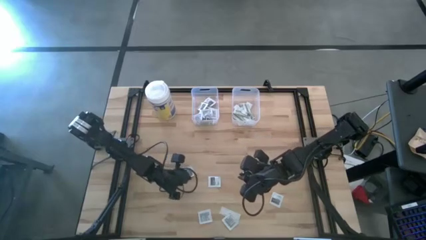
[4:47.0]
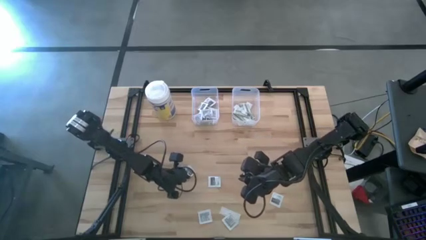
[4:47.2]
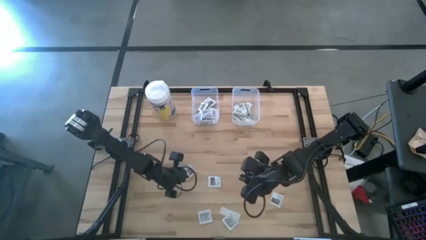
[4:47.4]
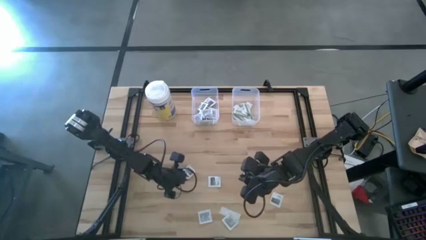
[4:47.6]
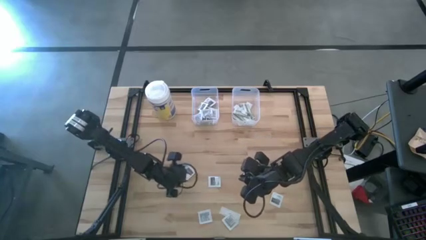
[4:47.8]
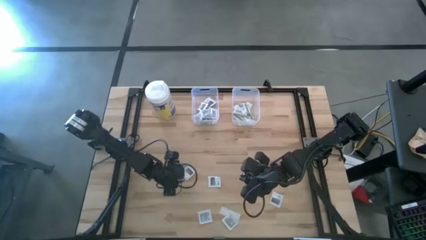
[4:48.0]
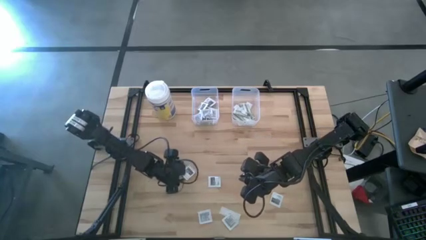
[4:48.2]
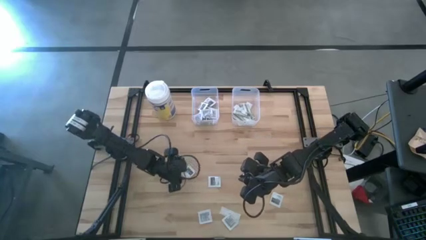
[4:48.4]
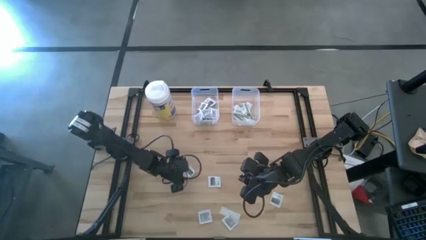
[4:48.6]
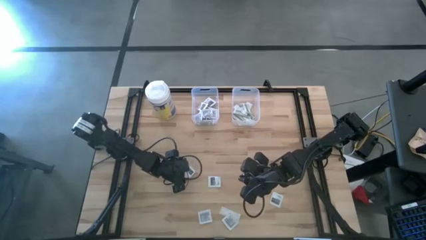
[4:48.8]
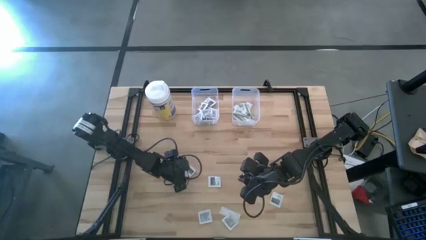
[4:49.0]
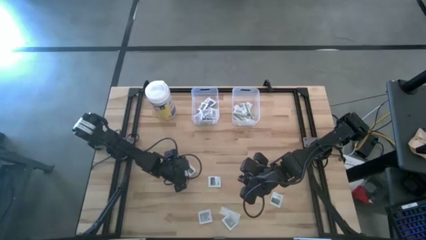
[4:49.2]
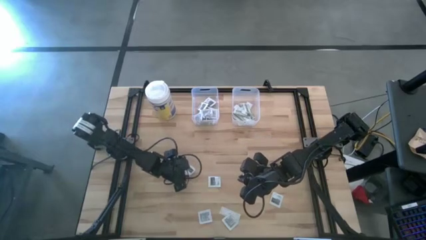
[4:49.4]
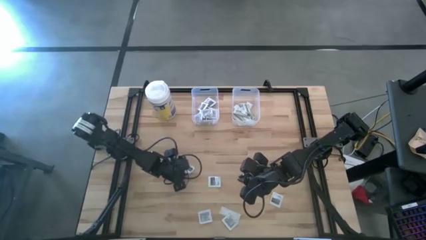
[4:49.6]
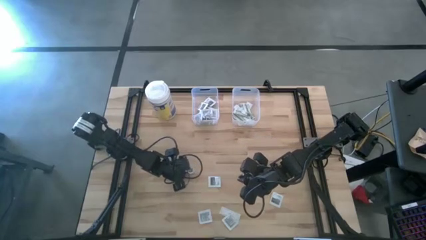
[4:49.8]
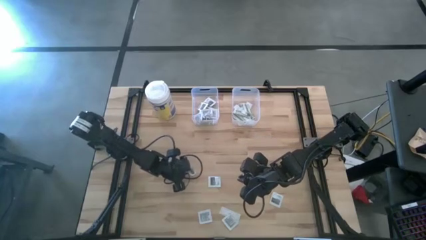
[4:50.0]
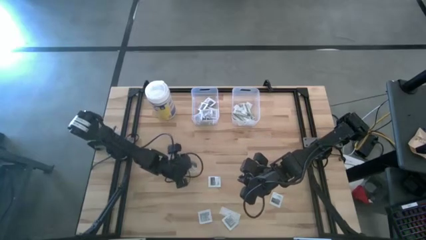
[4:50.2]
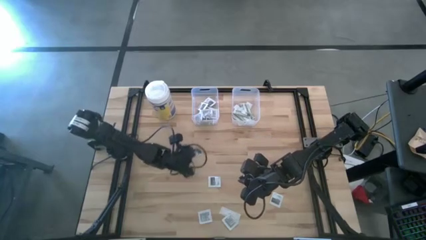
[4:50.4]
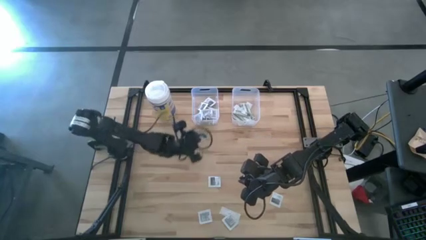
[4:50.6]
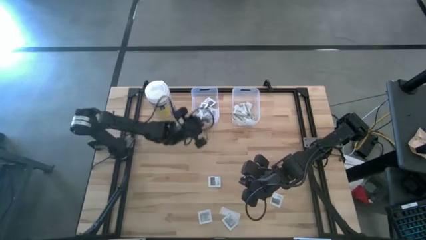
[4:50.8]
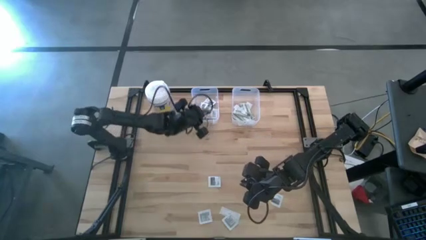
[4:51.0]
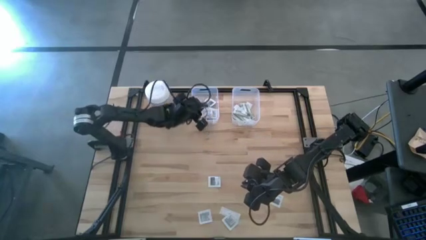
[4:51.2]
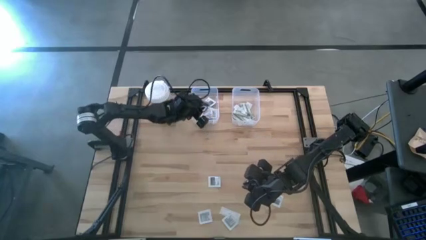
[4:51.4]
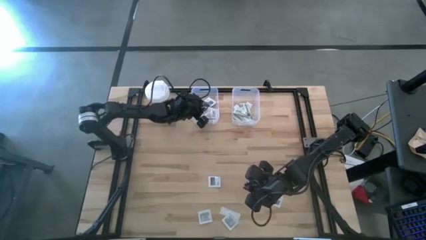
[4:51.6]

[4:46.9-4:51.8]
Task: Pick & Place First Aid Supplies
Put the towelette pack into the left transparent bin

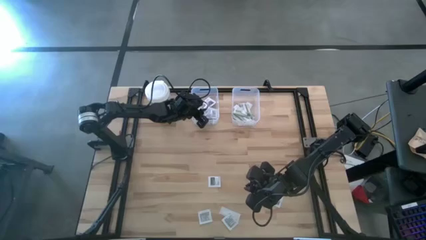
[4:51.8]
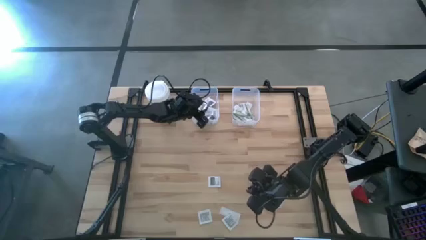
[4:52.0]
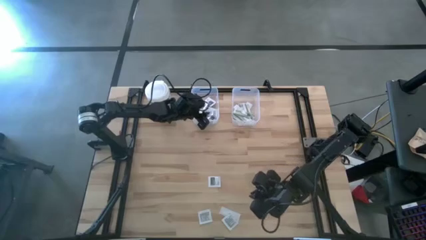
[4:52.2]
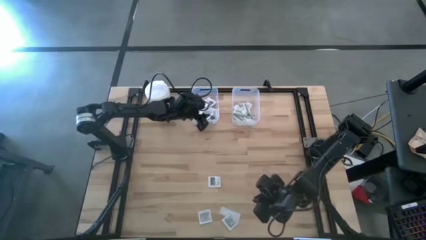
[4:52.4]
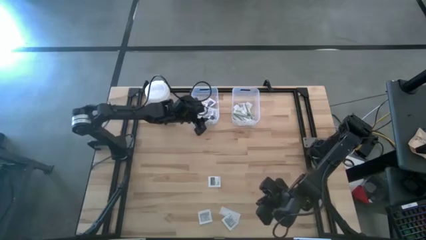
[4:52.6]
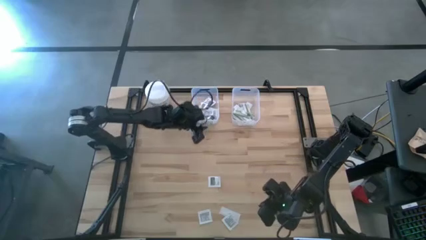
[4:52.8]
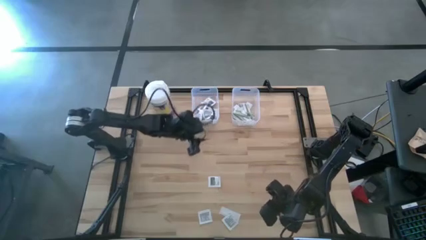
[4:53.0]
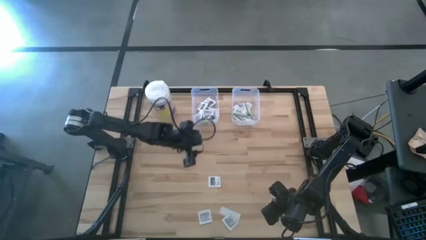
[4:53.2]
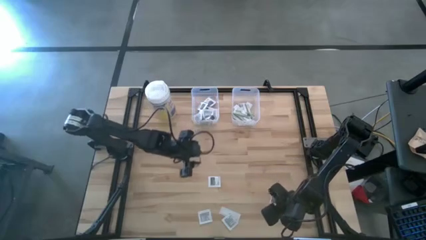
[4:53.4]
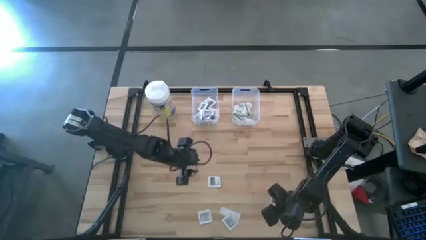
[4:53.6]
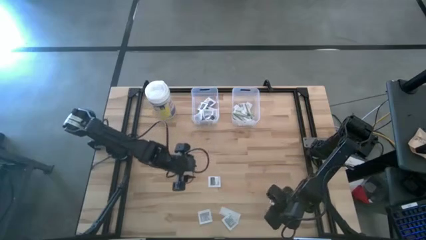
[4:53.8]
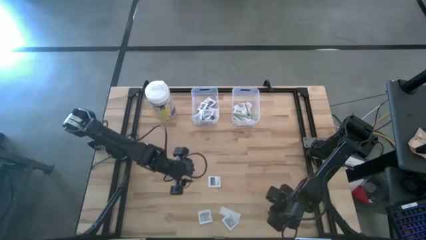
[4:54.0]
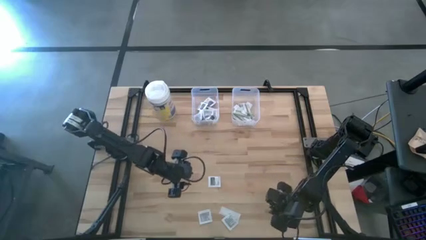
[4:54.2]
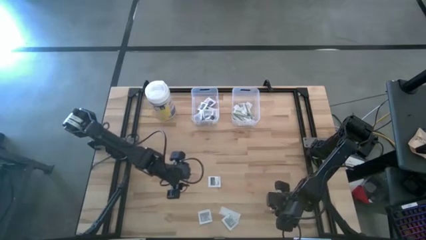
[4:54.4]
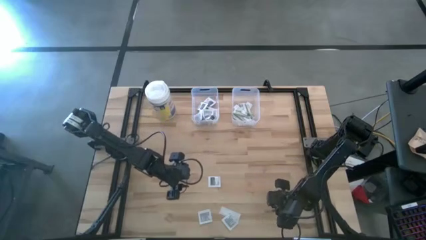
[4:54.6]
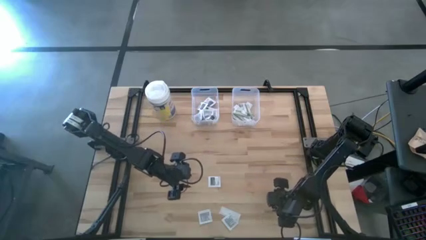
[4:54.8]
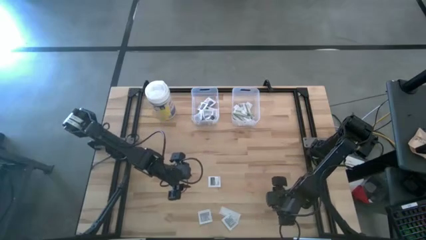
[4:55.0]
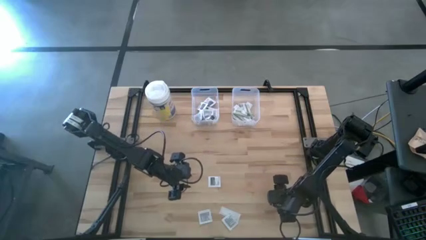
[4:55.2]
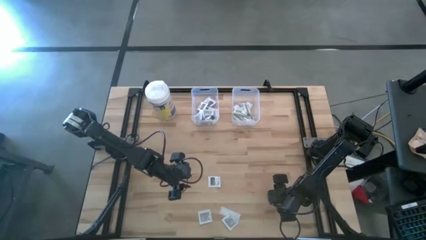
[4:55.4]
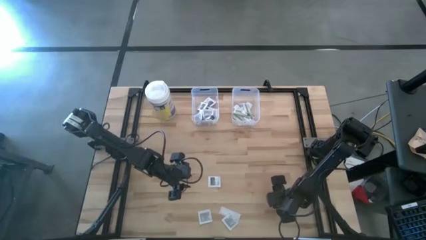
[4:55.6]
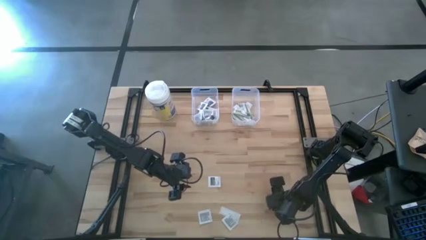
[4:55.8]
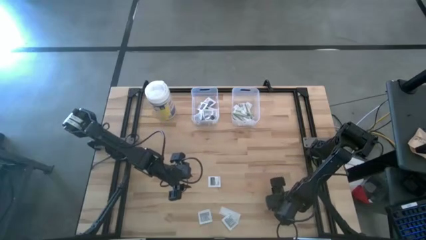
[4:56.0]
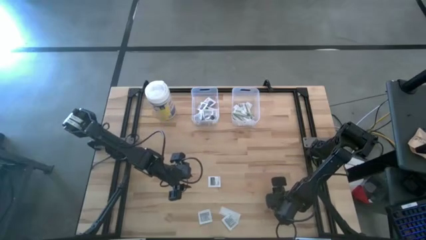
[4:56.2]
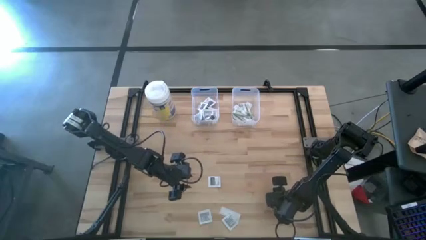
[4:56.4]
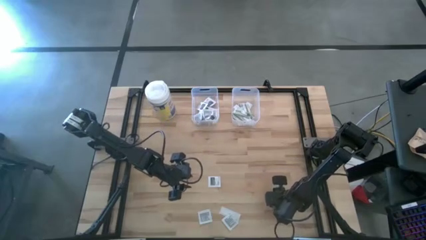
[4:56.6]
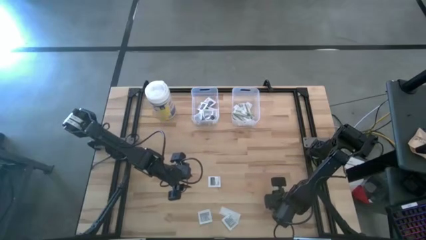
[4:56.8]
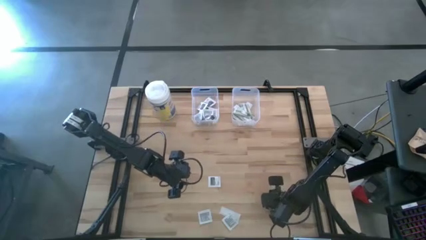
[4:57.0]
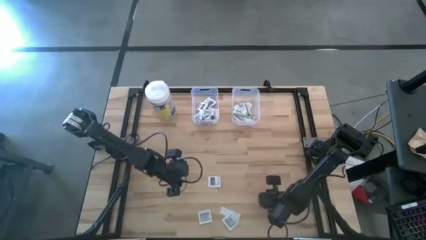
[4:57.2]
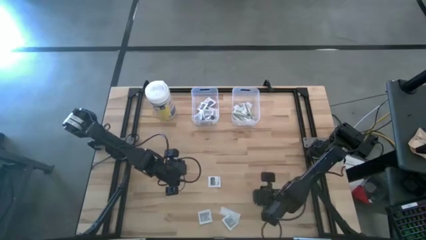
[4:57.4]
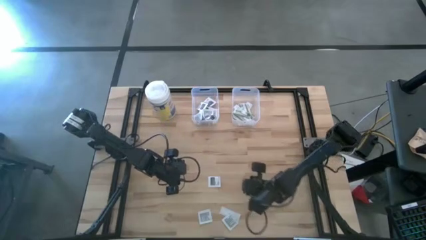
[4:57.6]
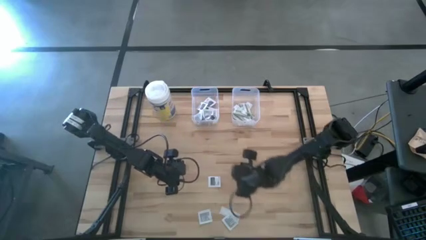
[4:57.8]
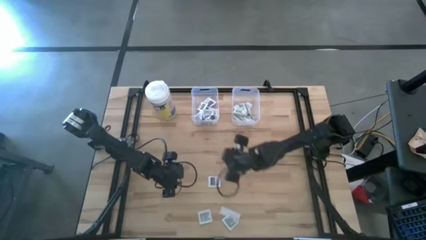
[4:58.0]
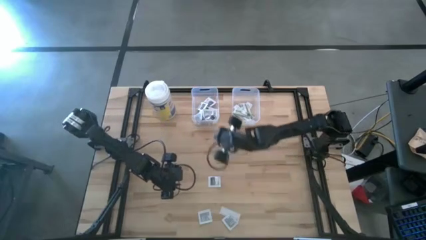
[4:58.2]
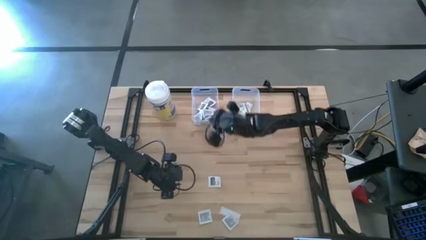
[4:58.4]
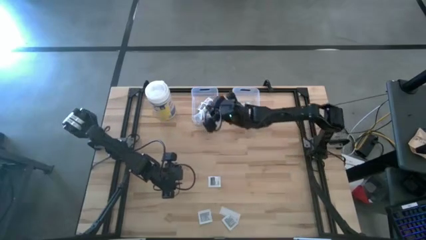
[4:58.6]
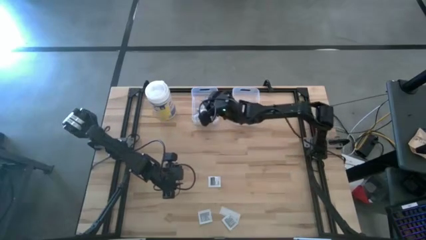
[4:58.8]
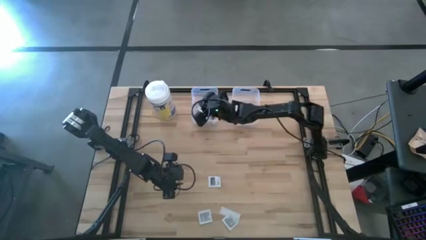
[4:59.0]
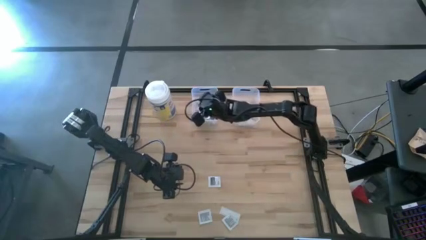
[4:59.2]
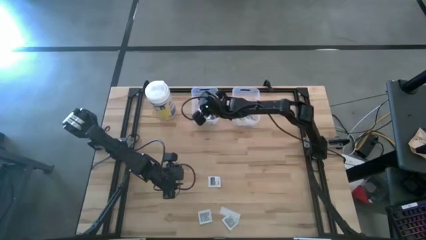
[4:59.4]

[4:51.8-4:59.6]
Put the towelette pack into the left transparent bin

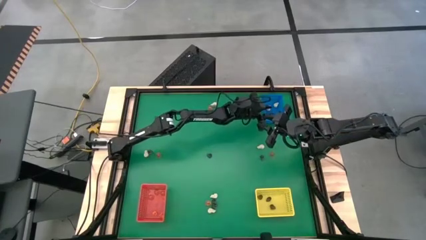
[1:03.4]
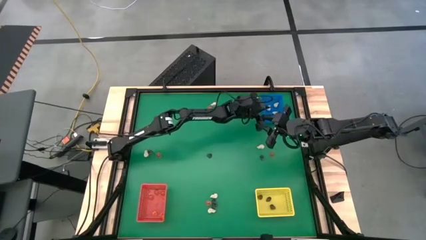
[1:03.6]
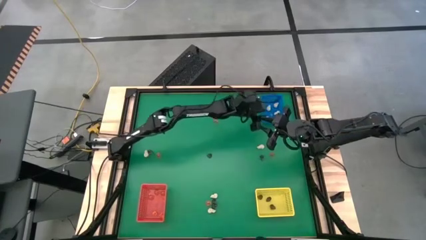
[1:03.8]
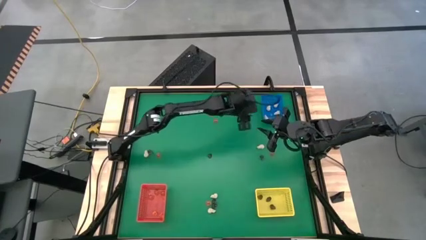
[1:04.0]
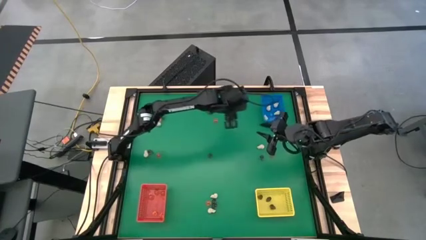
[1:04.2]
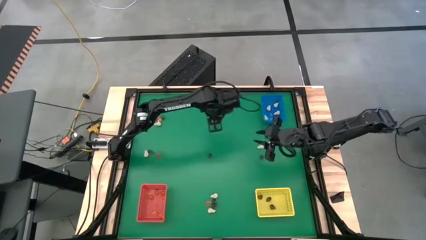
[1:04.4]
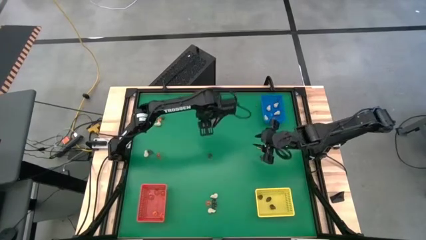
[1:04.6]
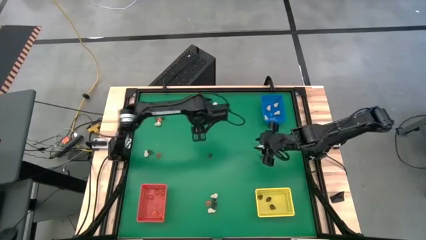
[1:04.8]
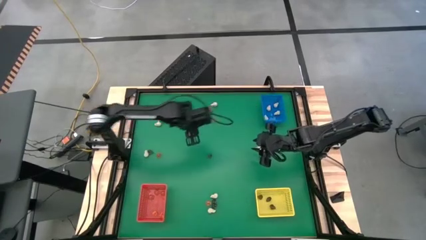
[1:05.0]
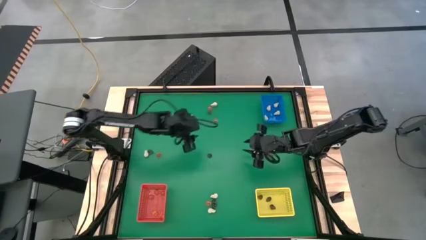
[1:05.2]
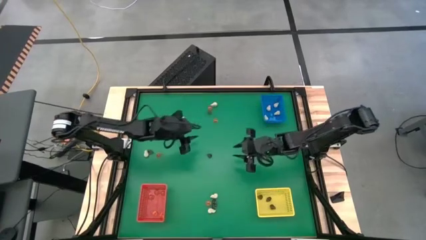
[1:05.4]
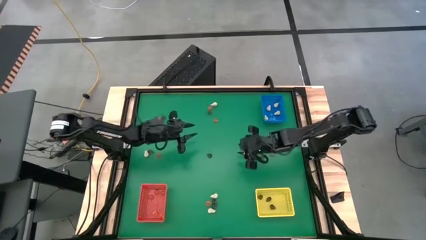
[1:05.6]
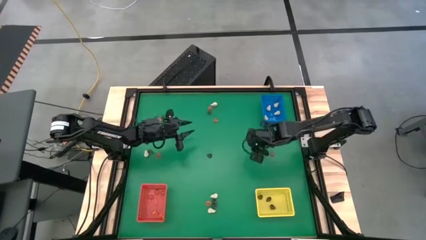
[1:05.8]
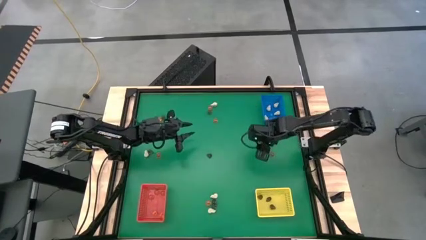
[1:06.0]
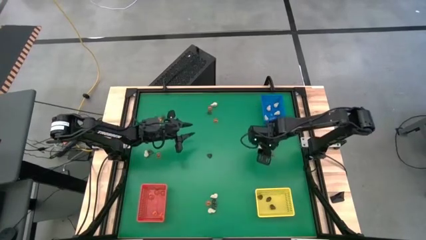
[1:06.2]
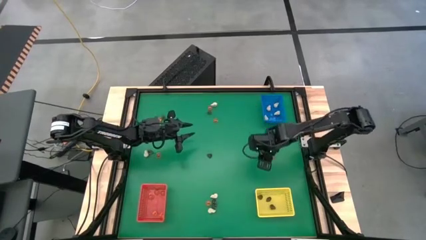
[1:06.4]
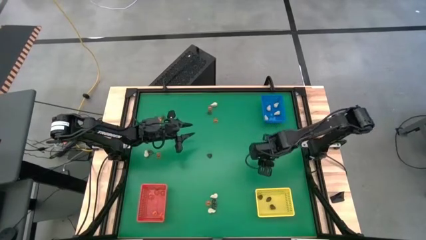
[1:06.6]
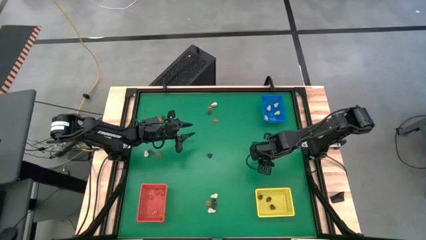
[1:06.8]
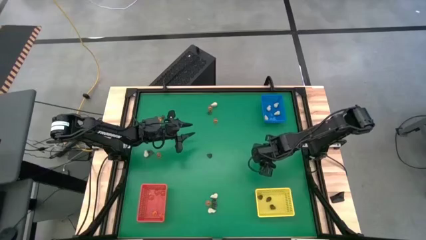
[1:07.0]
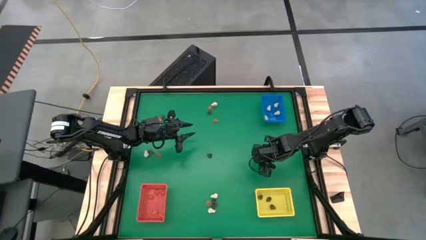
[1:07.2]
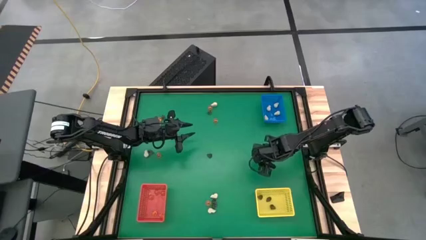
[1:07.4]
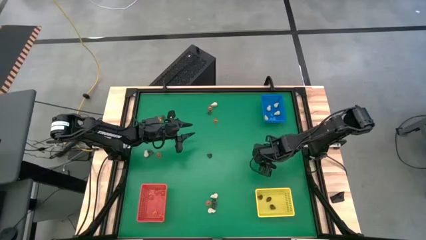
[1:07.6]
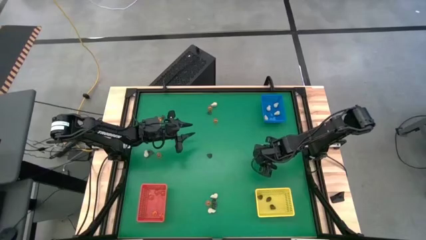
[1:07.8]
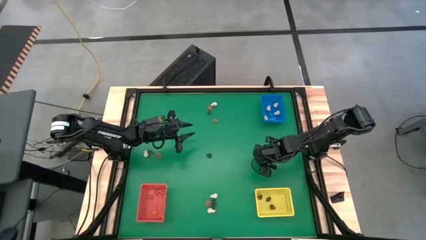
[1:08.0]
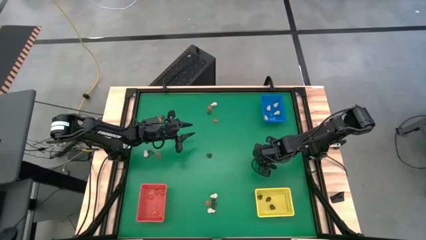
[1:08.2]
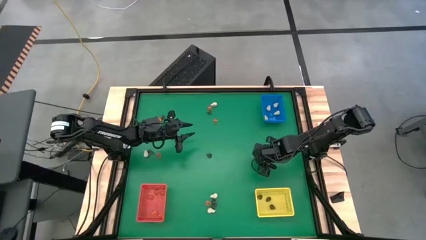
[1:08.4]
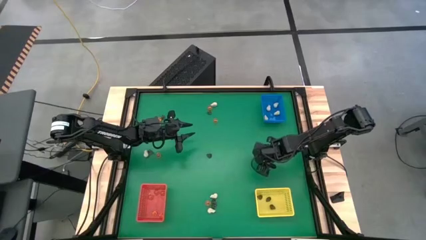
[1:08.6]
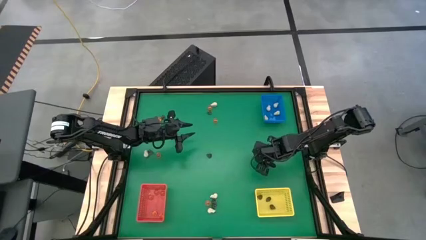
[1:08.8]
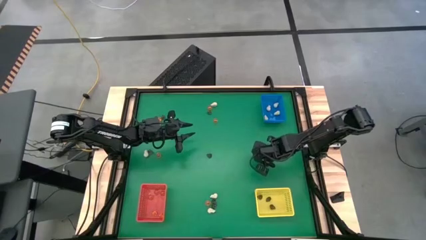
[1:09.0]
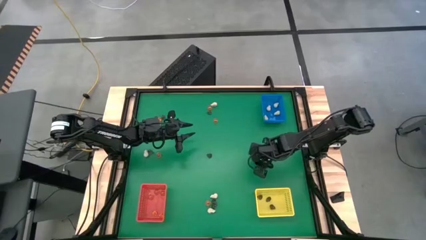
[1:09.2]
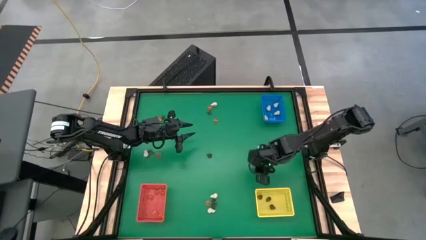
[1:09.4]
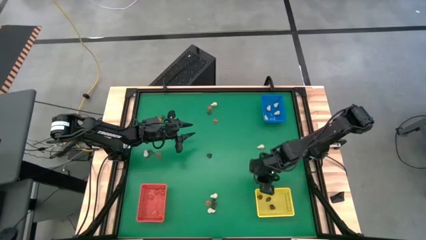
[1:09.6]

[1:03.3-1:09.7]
Task: Sort Halloween decoration
Put the black skull toy into the yellow bin
